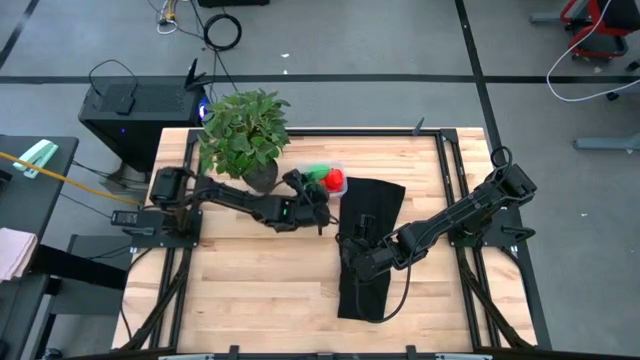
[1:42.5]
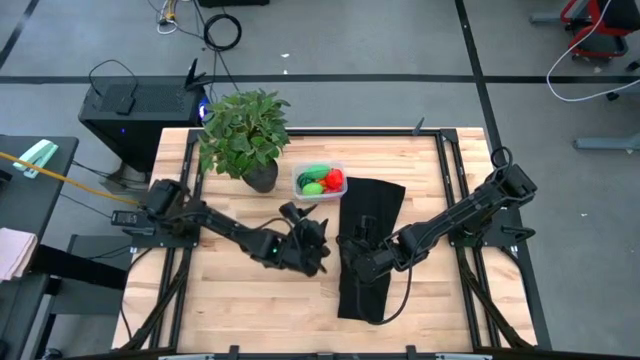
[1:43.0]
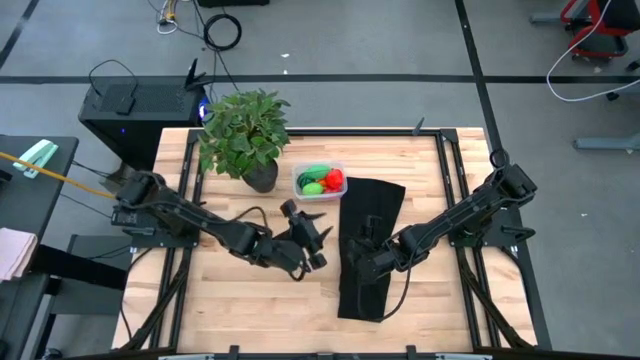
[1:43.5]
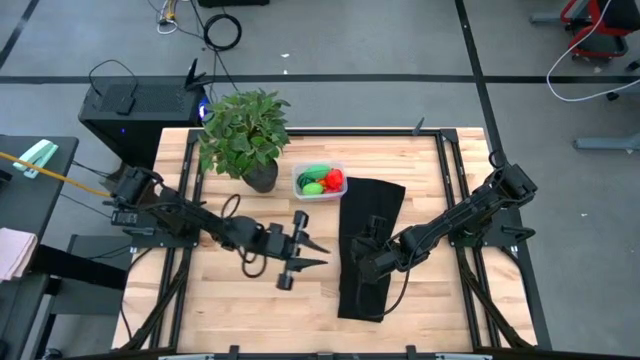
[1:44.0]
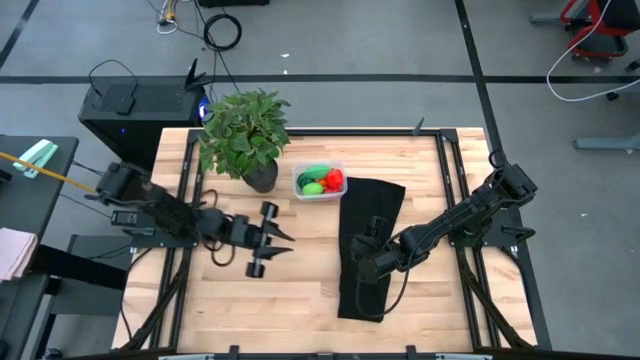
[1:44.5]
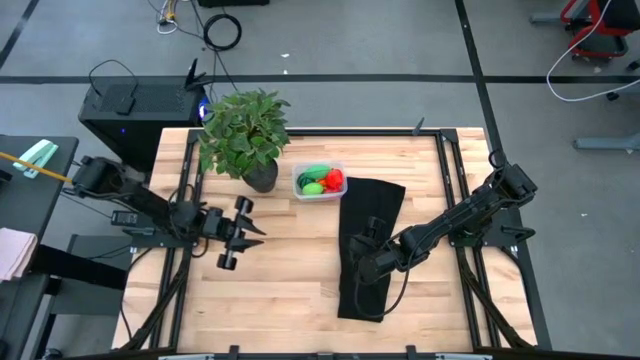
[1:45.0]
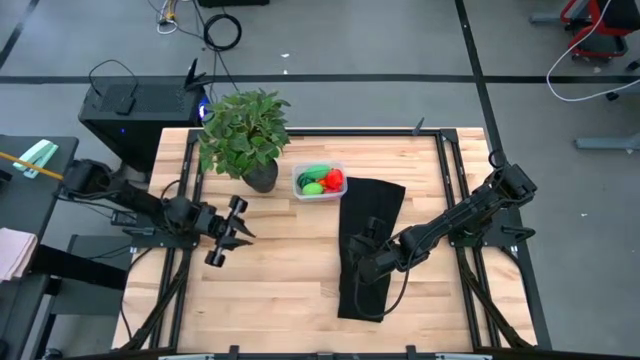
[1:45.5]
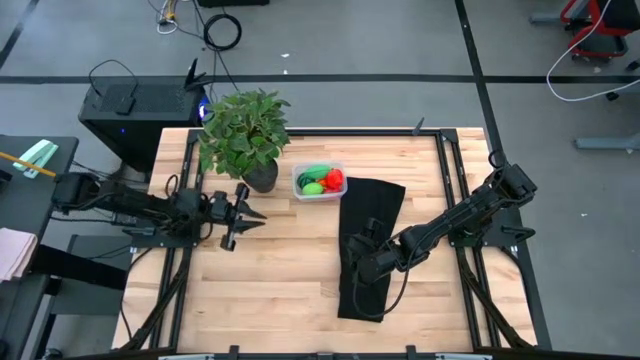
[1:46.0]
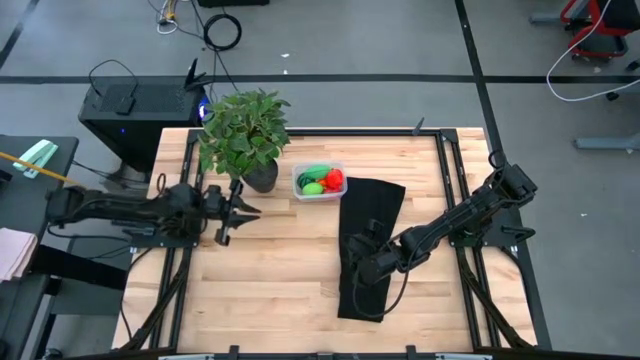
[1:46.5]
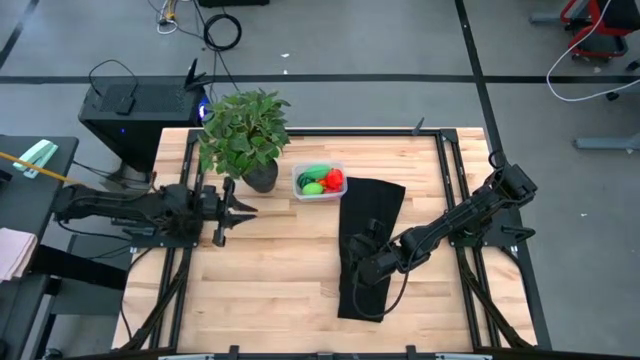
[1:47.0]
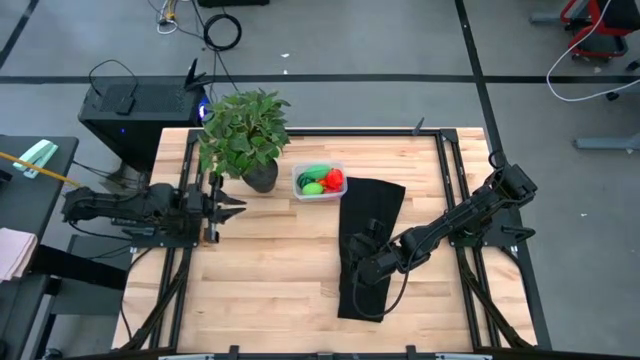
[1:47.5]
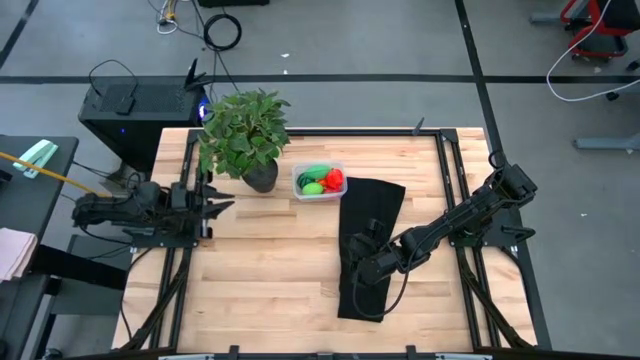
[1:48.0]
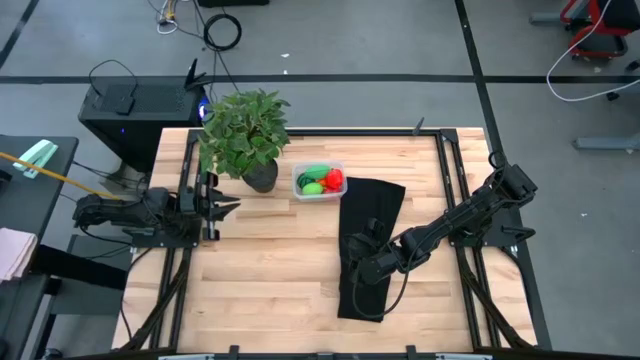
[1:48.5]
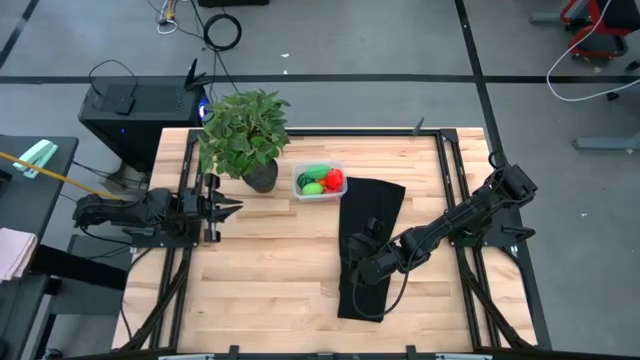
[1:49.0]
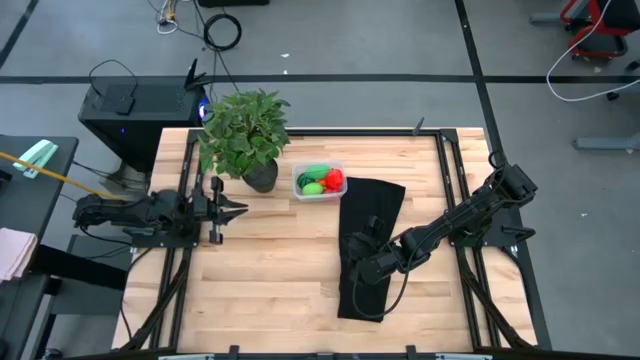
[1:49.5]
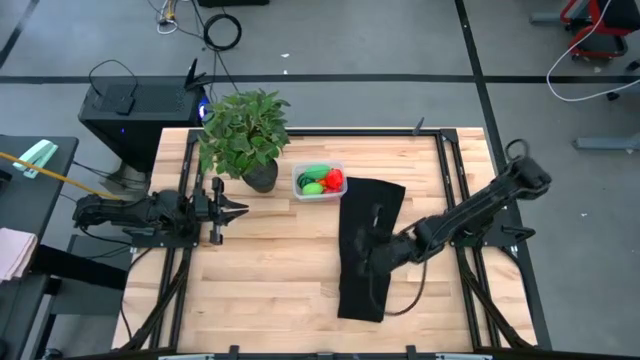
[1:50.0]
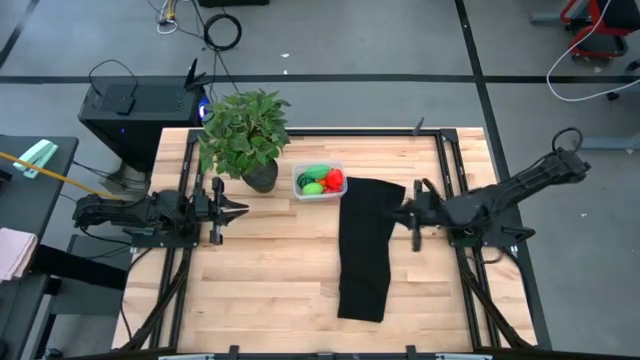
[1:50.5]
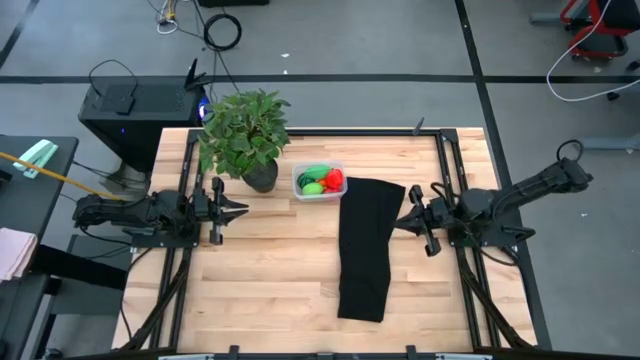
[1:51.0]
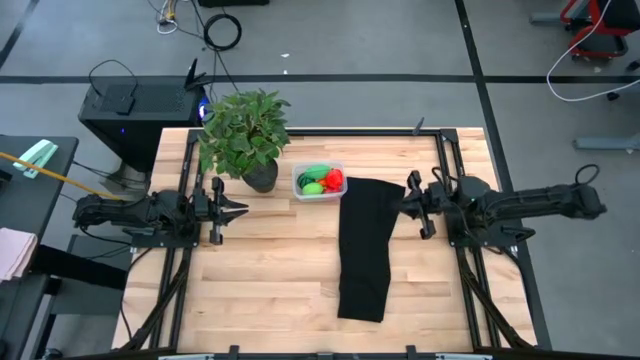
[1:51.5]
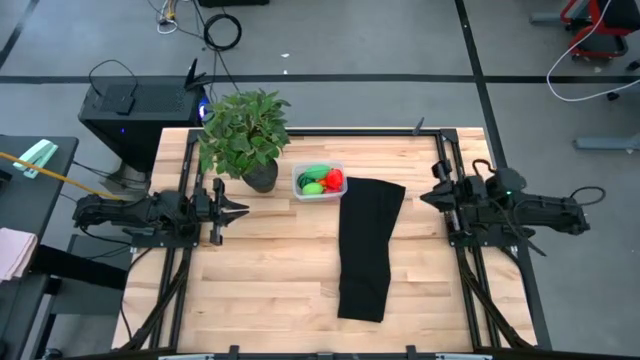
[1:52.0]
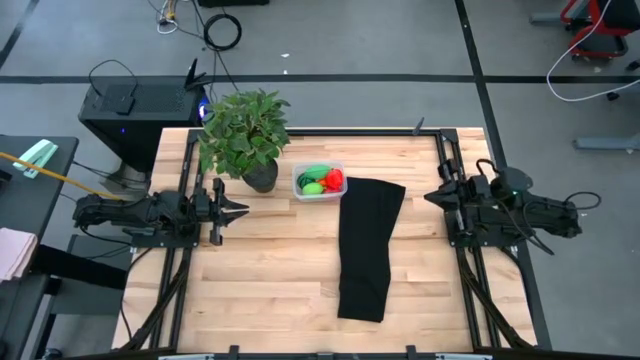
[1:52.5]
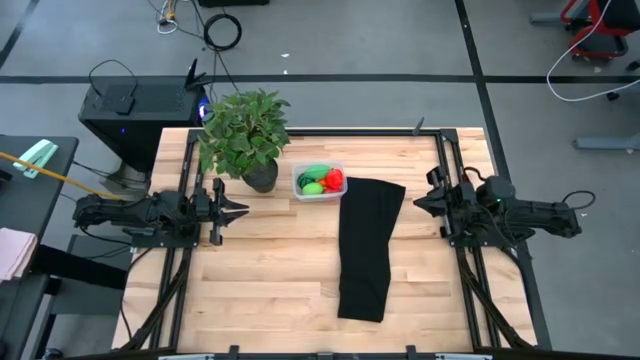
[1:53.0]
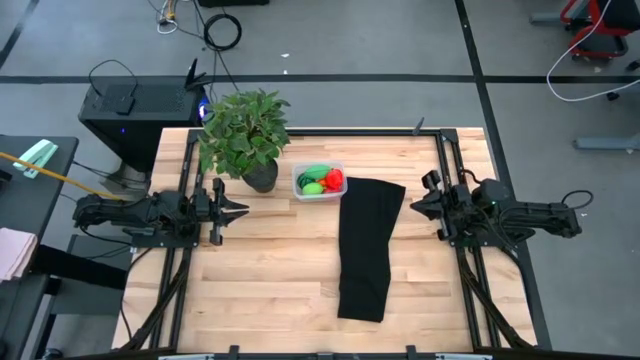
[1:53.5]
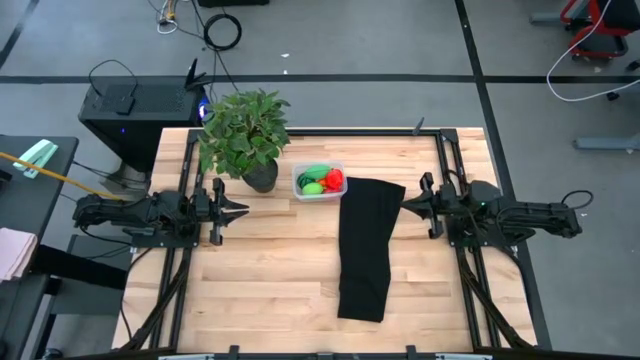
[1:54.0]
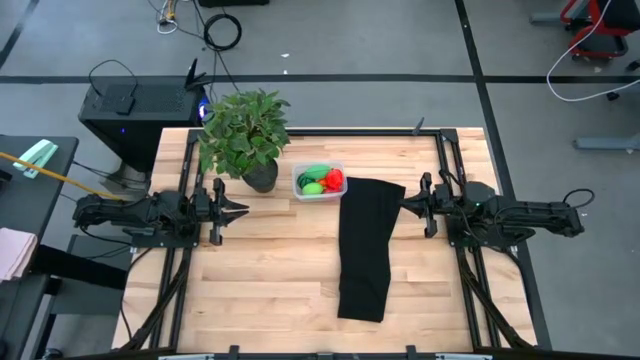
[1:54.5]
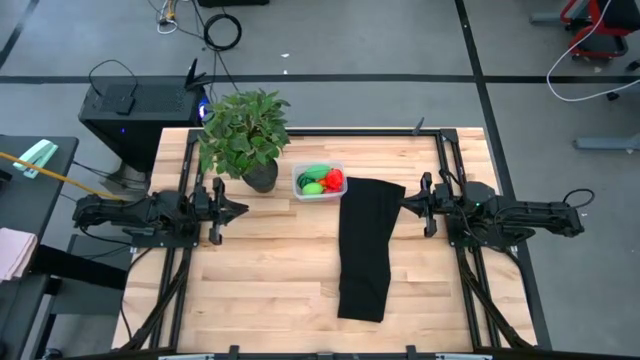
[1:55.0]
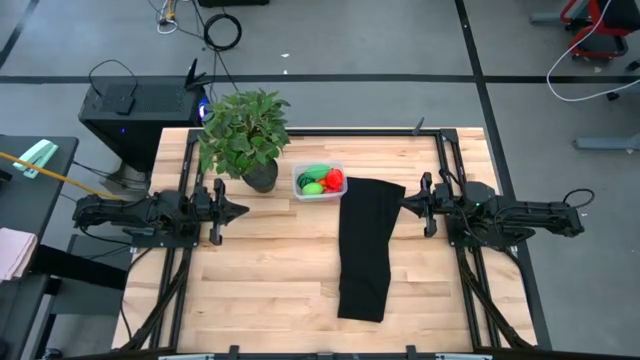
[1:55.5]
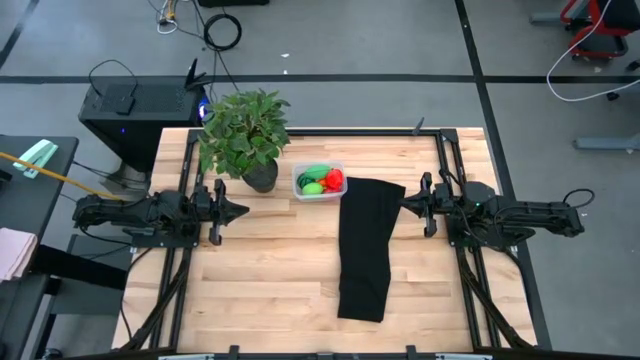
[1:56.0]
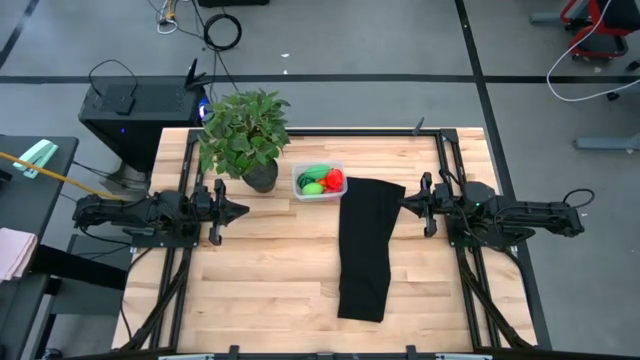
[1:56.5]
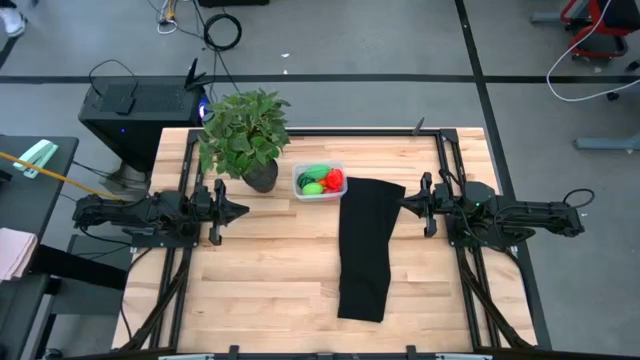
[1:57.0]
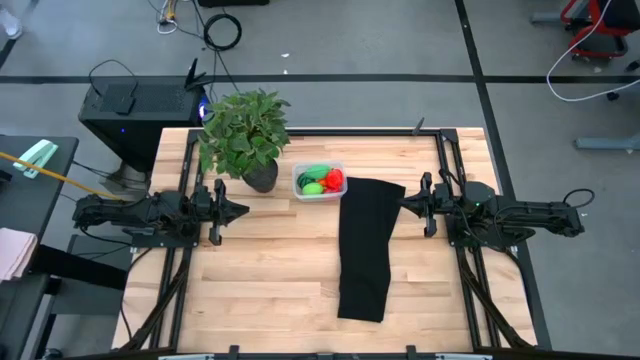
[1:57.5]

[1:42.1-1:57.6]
Task: Pick and placing Produce into tupperware
Return to Home Position

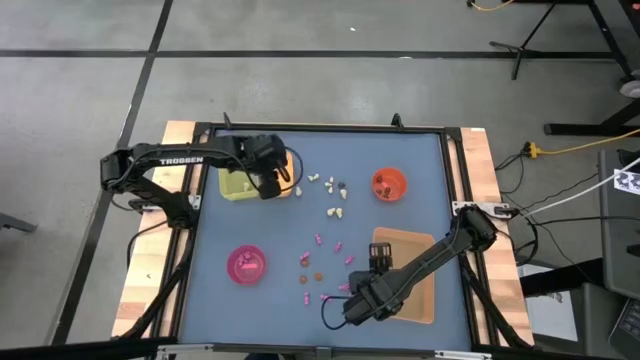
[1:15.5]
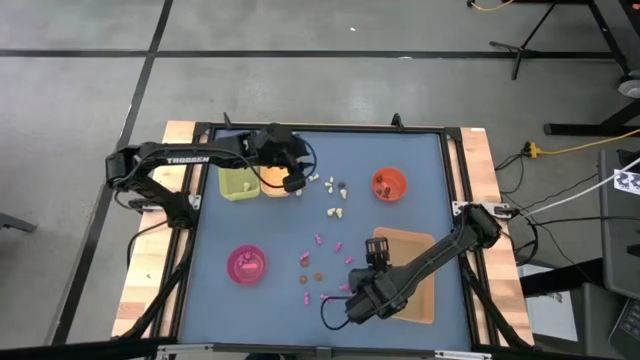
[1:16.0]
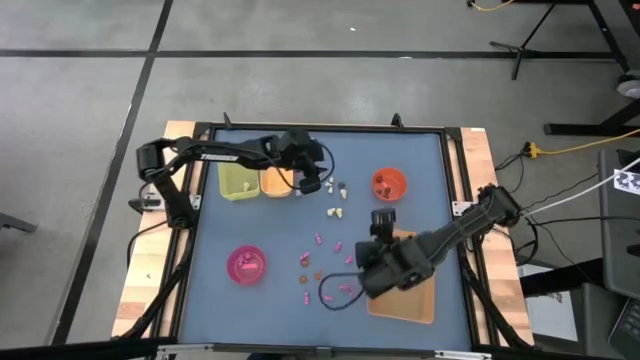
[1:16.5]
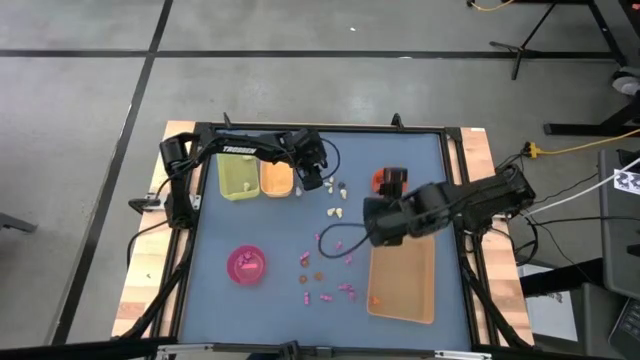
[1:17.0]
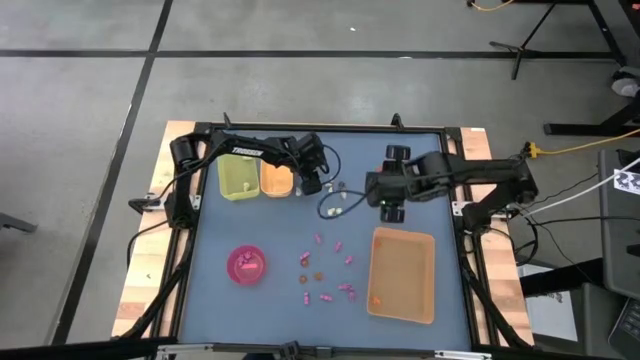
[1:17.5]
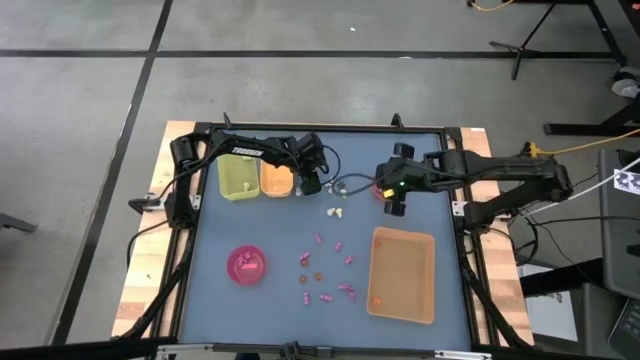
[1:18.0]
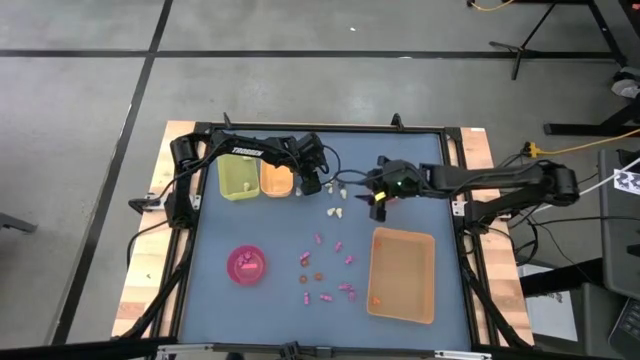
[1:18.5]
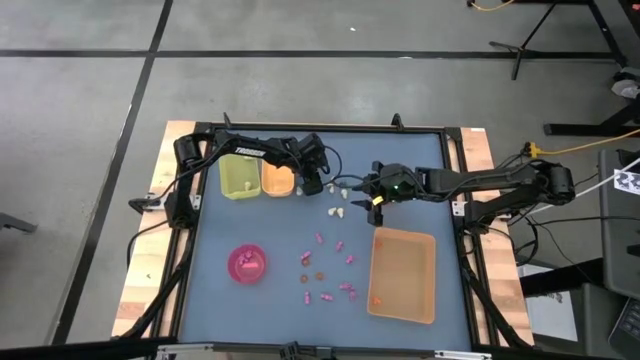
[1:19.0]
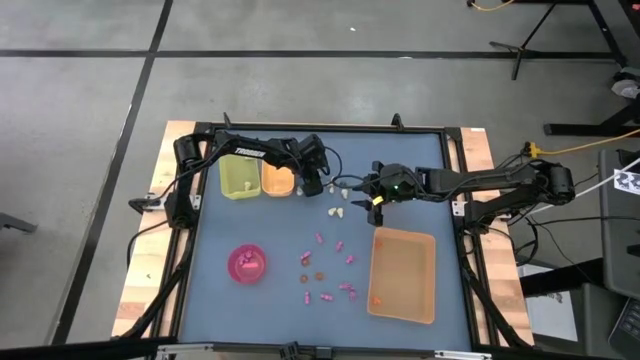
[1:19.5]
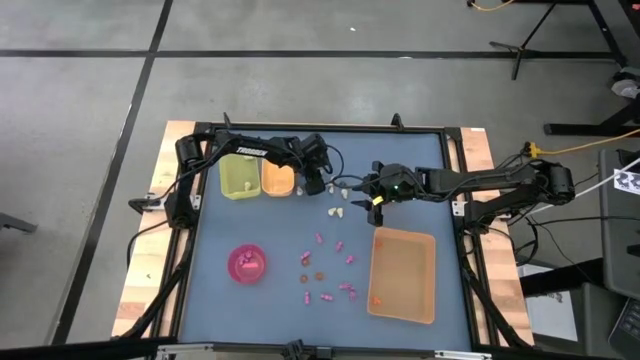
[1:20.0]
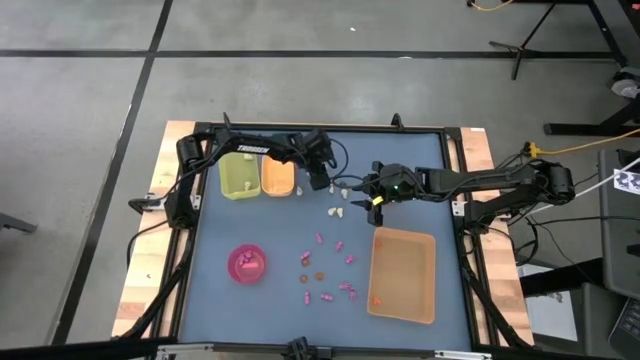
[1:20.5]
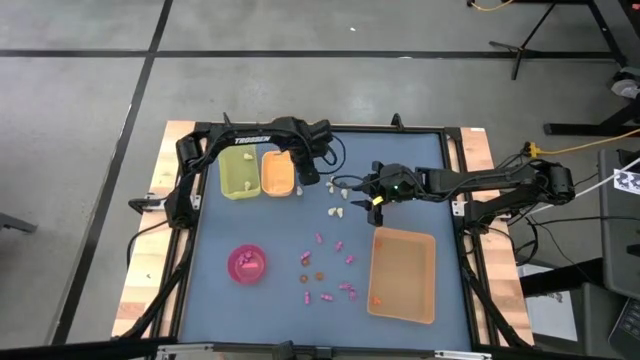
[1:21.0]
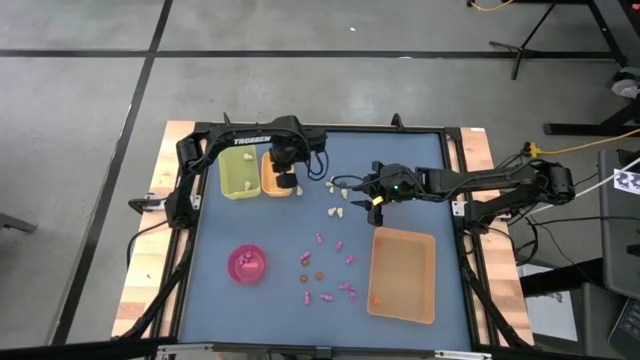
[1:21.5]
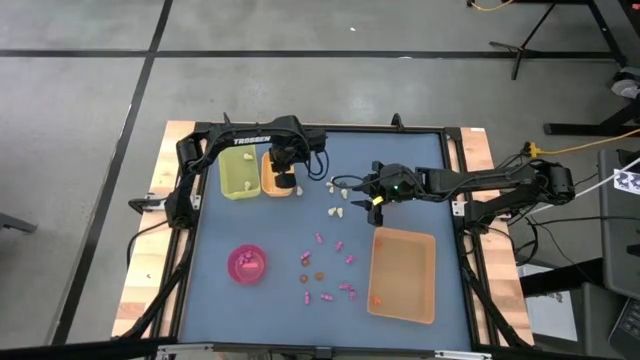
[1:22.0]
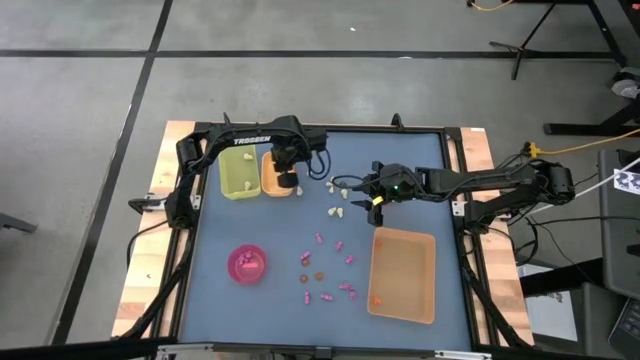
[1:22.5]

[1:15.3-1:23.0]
Task: Sort Halloween decoration
Put the small white skull toy into the yellow bin
